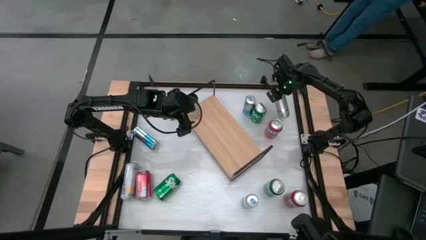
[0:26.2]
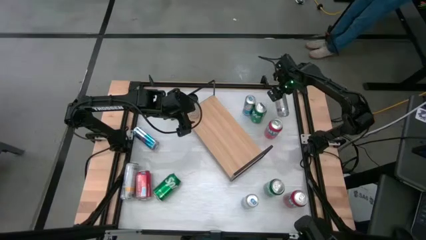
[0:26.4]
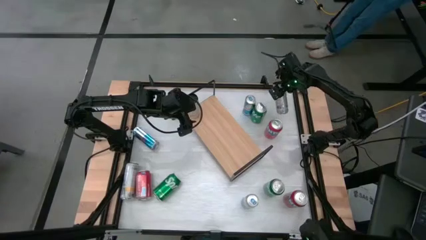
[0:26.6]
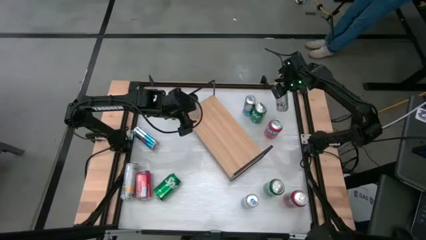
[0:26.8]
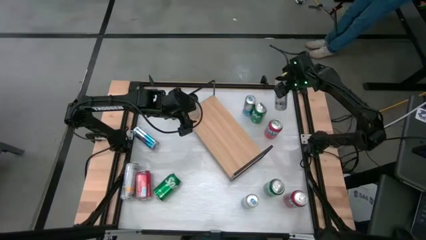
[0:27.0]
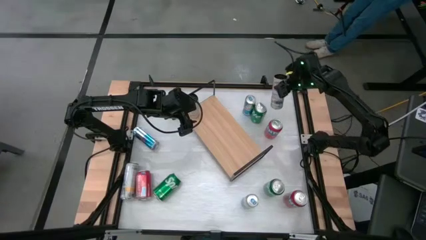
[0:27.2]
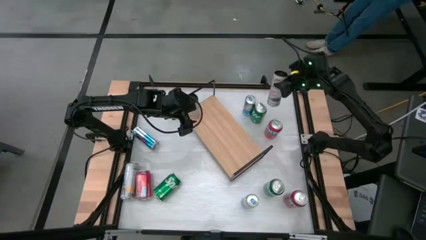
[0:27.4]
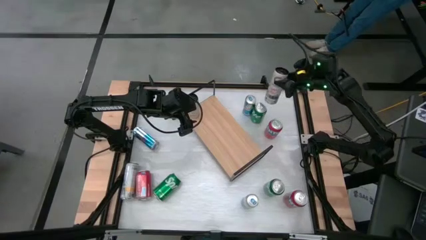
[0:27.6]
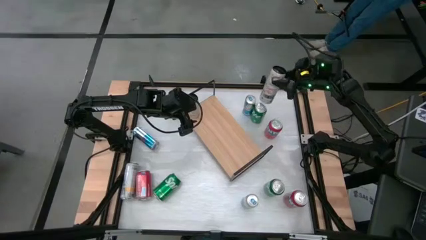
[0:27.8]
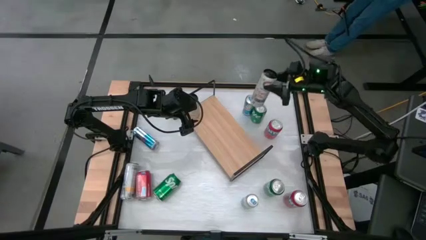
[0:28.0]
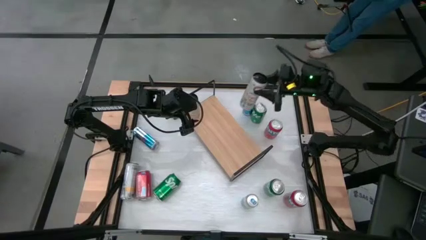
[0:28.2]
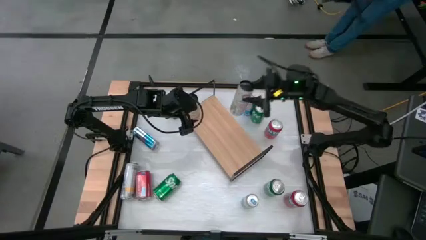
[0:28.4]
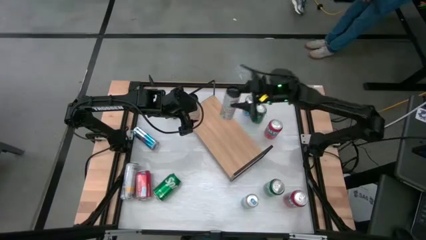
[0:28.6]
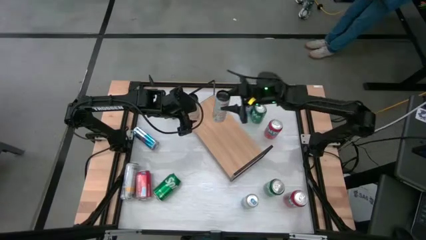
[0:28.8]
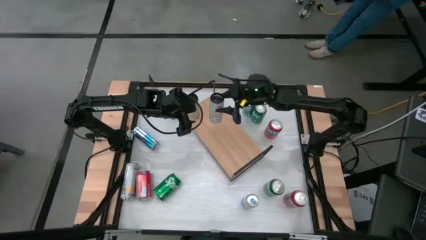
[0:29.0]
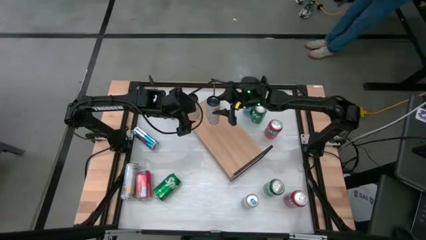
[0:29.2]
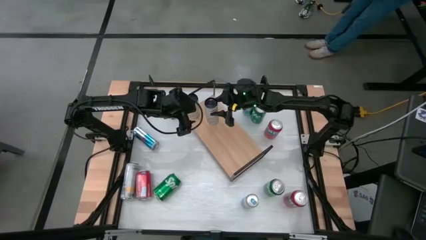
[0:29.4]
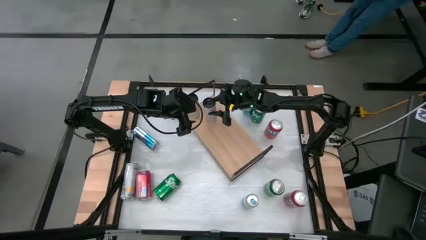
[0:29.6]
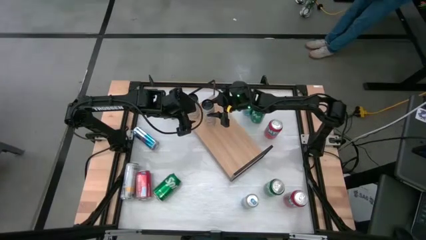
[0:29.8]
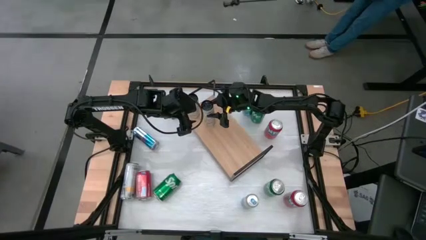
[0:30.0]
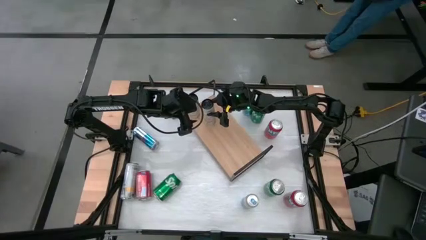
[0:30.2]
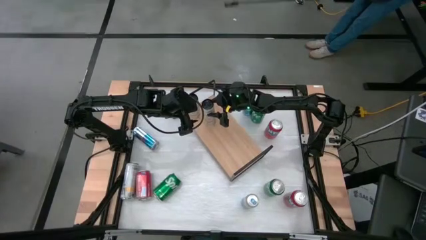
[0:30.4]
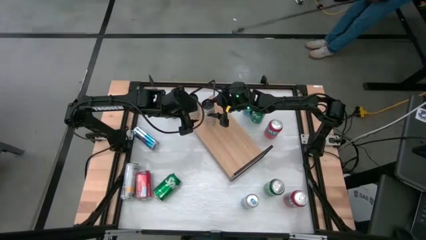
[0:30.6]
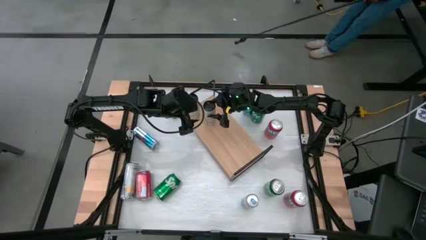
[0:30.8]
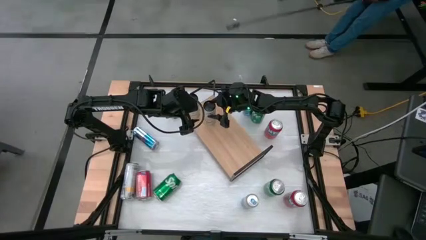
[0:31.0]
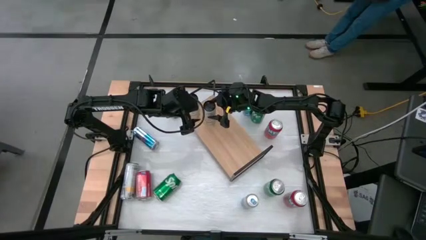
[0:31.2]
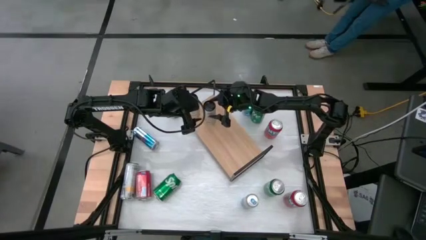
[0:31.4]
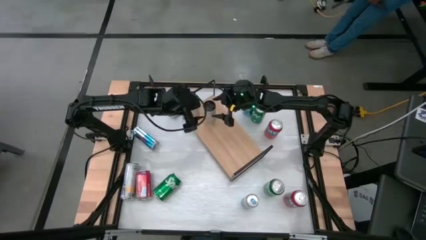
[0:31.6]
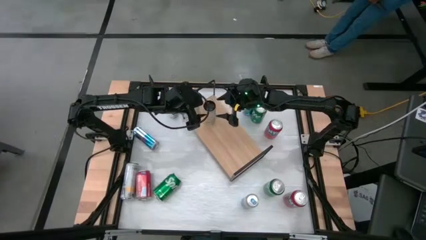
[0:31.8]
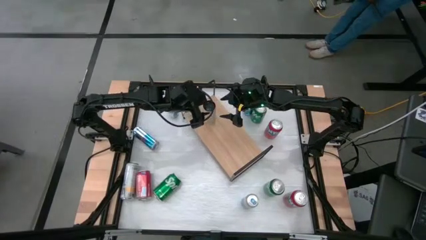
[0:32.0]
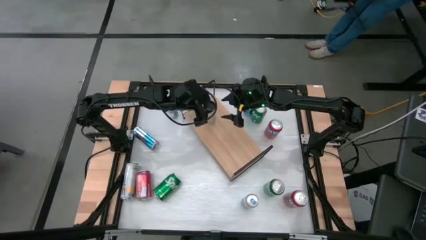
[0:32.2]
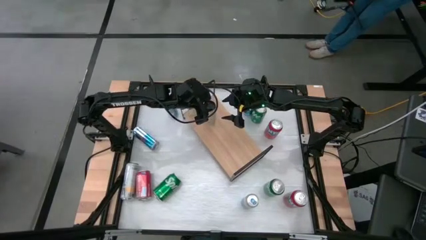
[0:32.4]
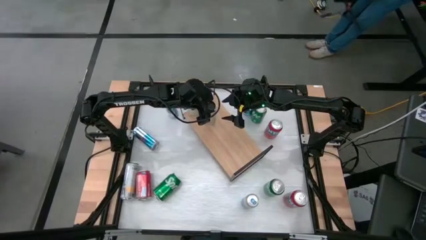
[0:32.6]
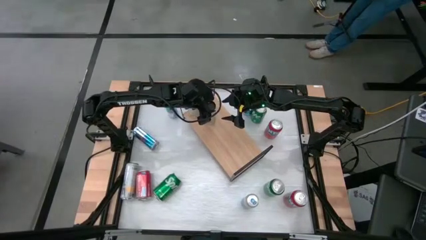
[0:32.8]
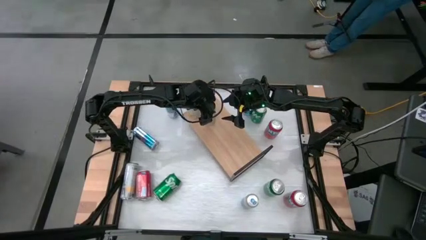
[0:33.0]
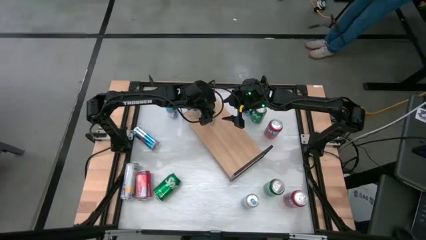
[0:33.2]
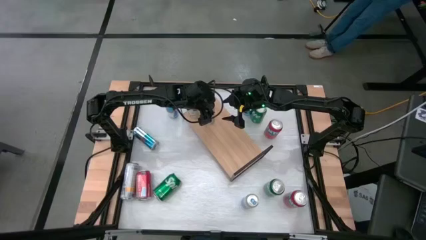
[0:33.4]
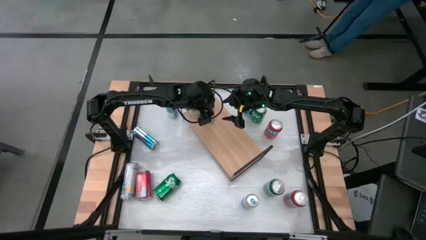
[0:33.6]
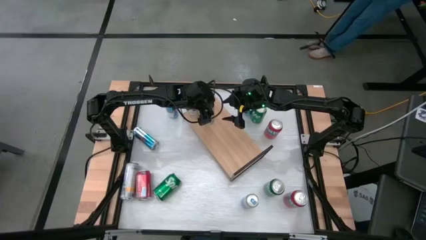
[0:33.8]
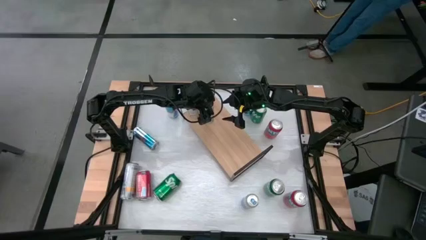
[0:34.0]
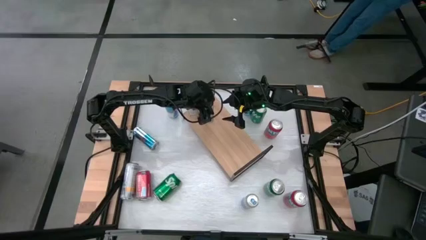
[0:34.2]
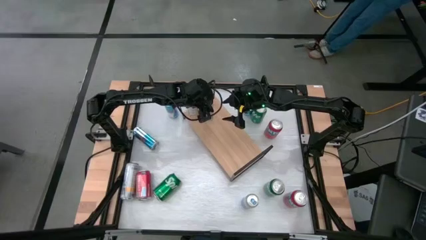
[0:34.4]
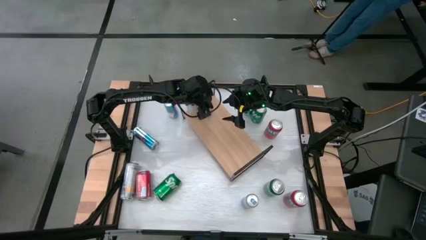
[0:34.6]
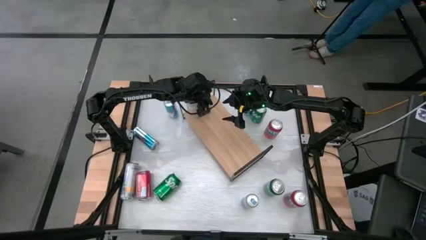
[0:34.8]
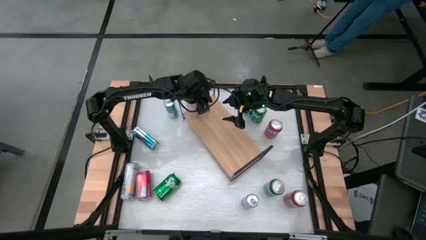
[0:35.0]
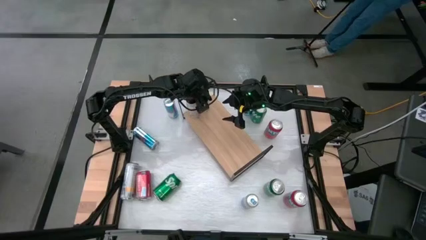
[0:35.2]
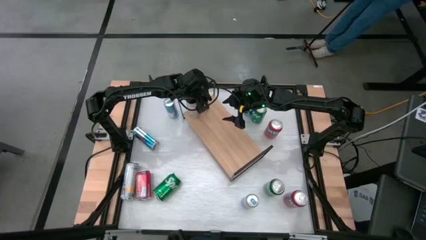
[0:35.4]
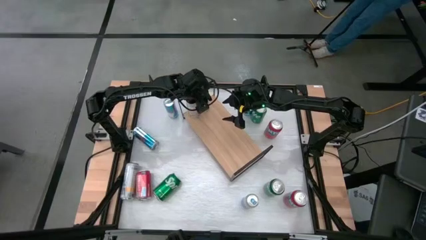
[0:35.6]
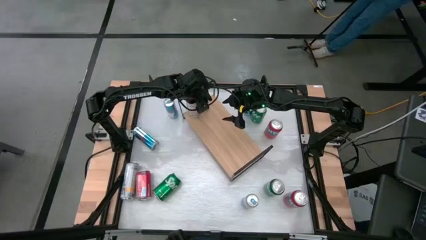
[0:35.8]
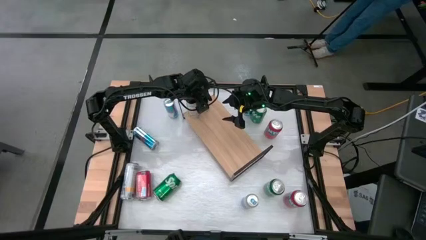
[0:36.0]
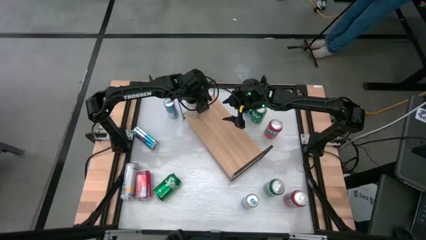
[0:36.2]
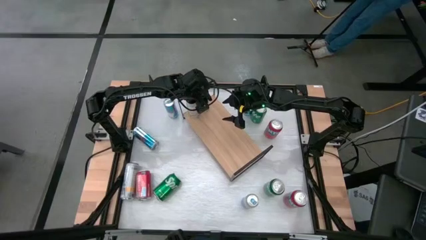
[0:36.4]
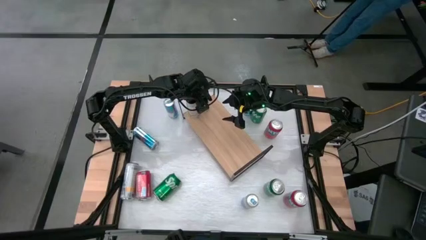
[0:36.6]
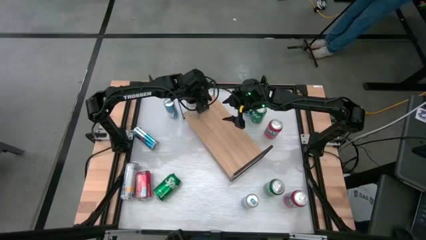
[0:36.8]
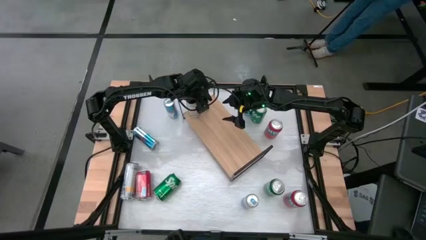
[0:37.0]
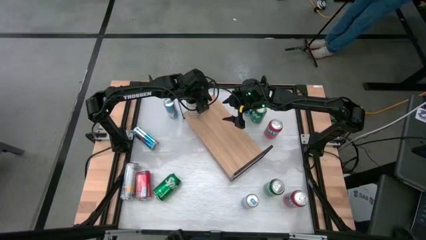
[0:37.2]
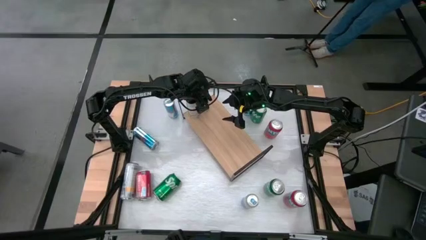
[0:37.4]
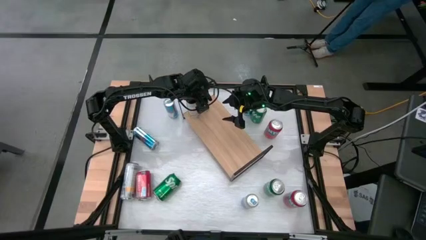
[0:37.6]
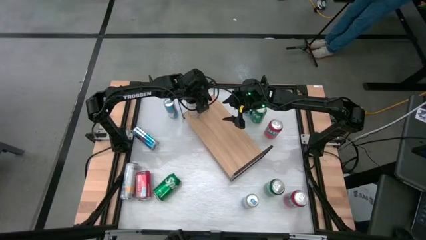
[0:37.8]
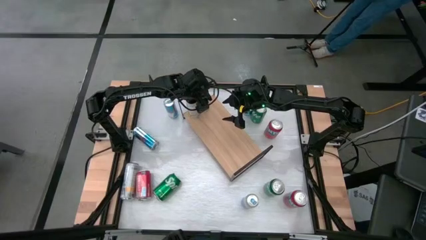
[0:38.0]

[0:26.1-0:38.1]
Task: Place canned beverage on shelf
Put the top white yellow soda can on the shelf aligned with the other white yellow soda can
